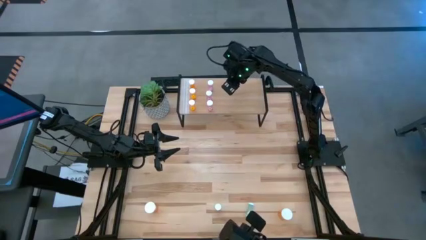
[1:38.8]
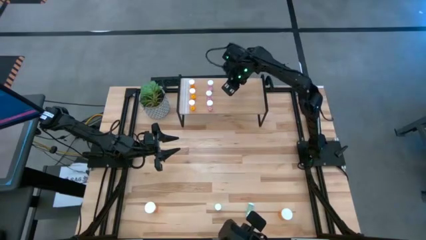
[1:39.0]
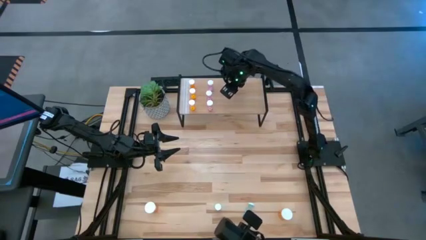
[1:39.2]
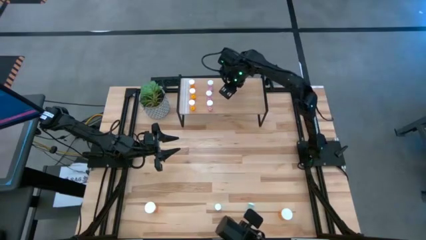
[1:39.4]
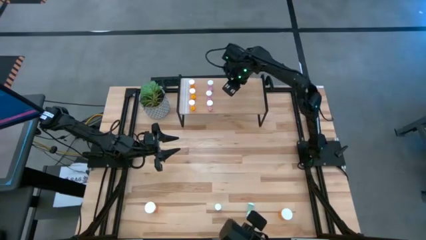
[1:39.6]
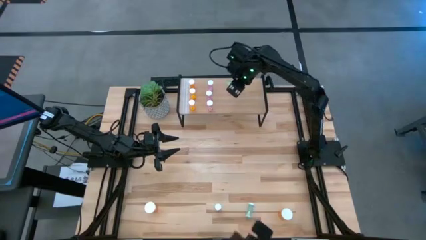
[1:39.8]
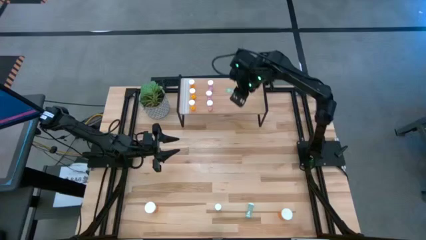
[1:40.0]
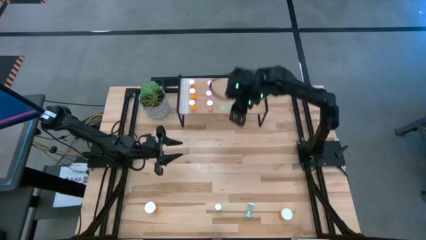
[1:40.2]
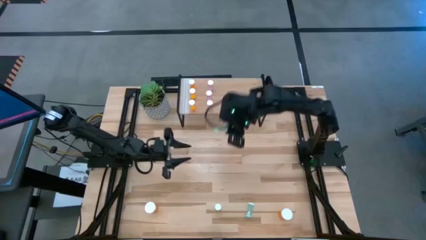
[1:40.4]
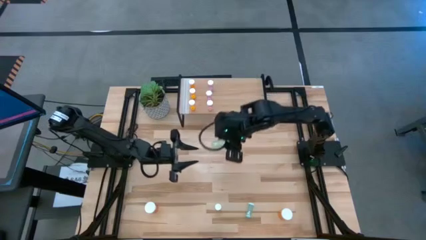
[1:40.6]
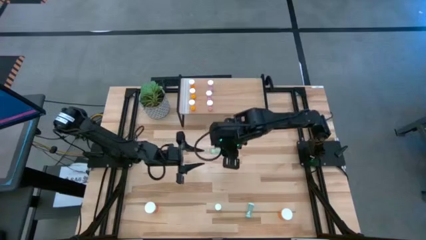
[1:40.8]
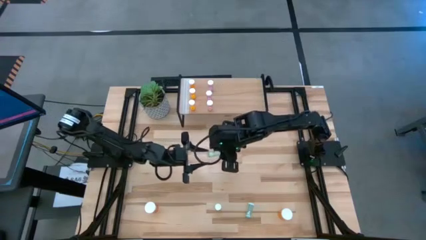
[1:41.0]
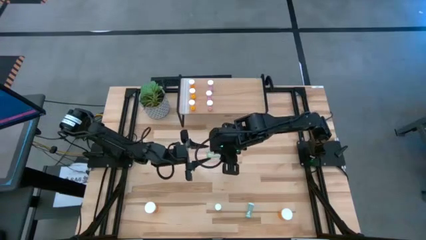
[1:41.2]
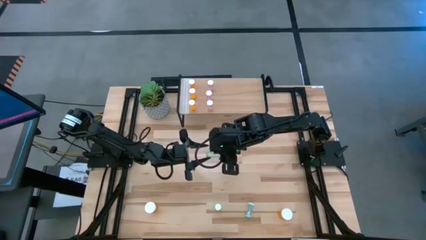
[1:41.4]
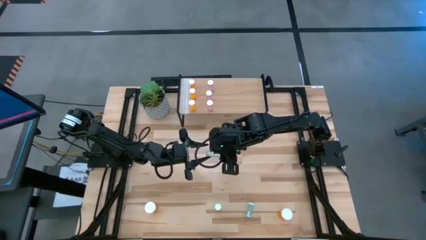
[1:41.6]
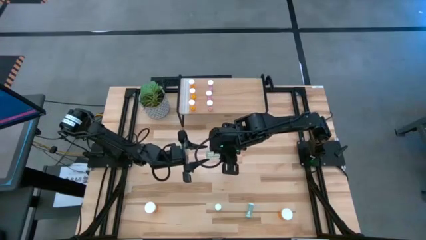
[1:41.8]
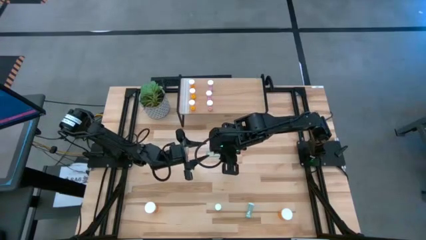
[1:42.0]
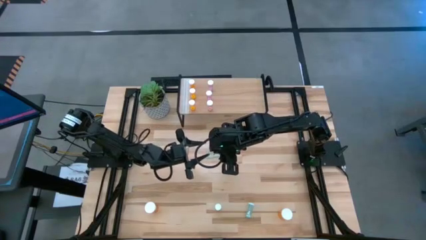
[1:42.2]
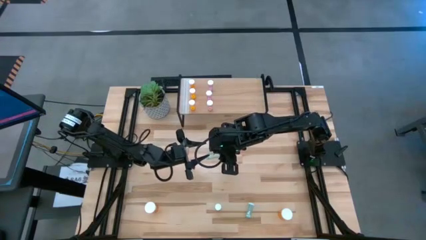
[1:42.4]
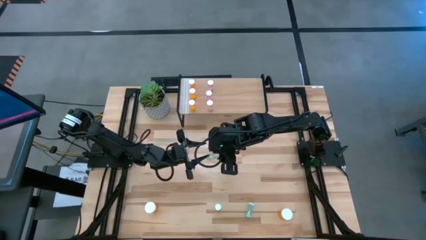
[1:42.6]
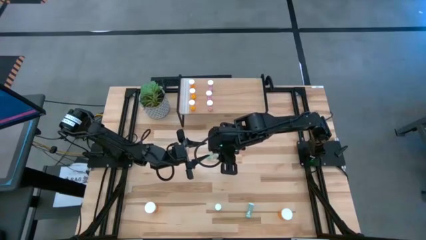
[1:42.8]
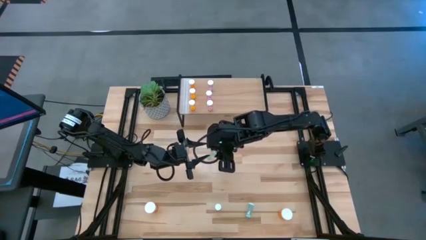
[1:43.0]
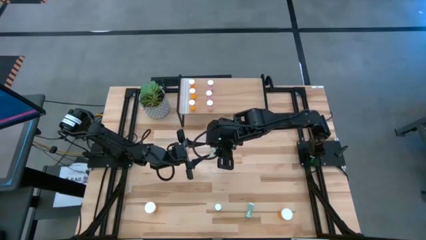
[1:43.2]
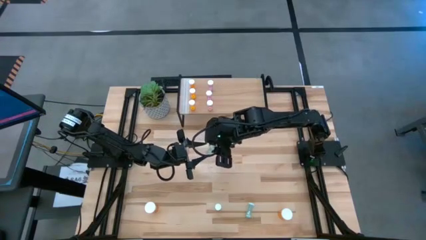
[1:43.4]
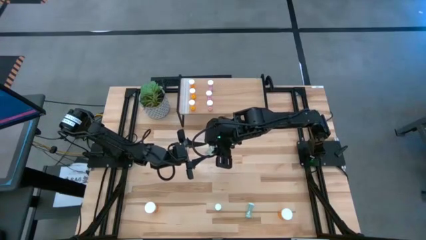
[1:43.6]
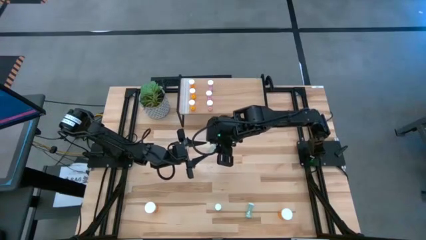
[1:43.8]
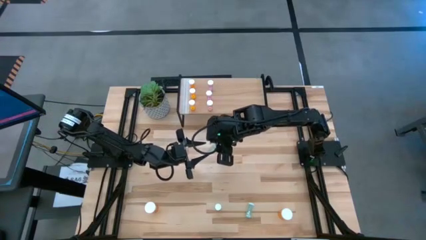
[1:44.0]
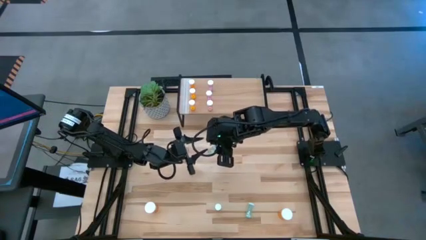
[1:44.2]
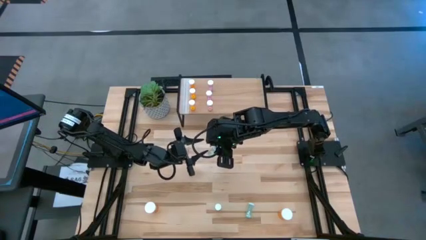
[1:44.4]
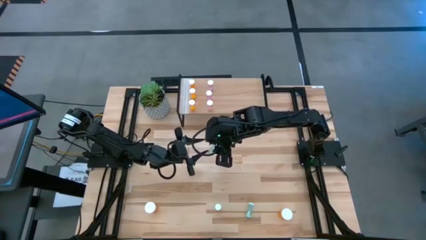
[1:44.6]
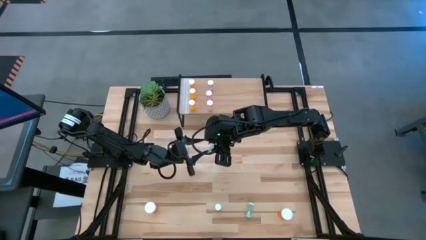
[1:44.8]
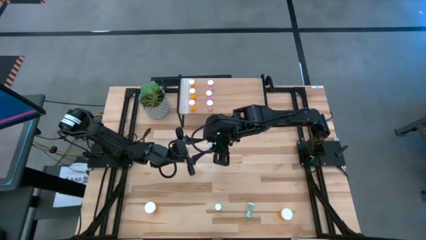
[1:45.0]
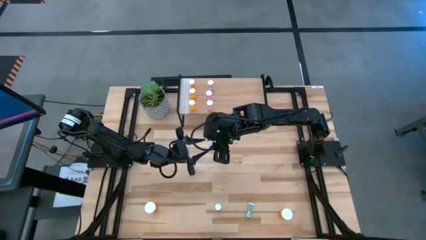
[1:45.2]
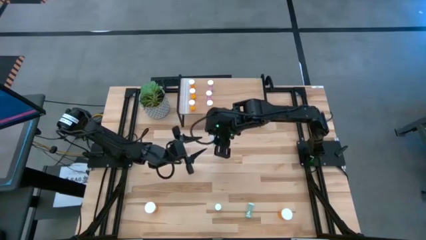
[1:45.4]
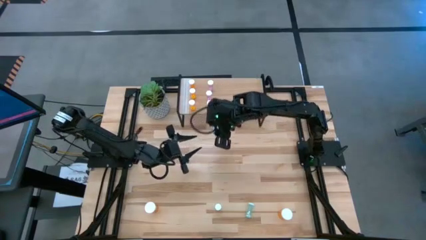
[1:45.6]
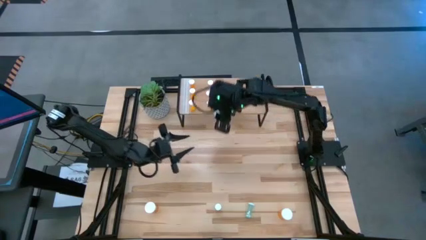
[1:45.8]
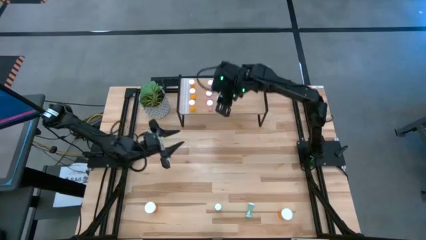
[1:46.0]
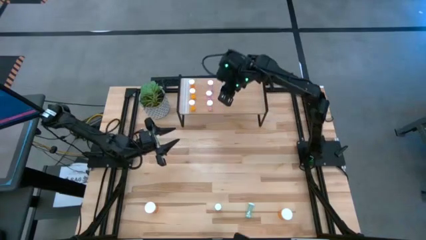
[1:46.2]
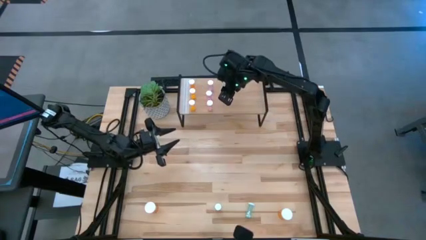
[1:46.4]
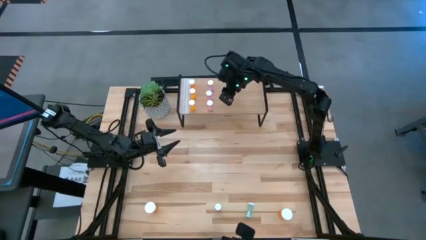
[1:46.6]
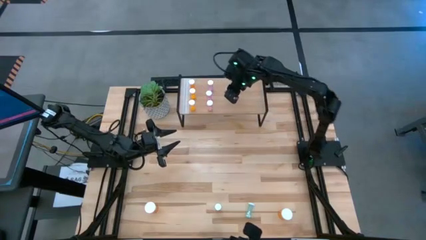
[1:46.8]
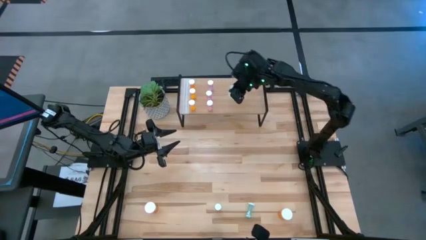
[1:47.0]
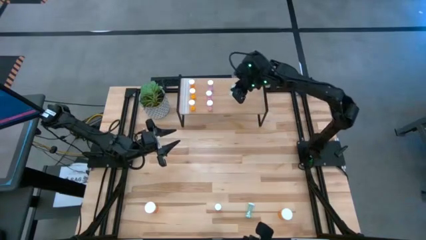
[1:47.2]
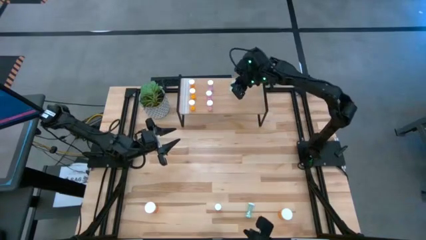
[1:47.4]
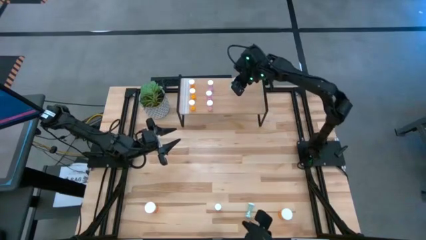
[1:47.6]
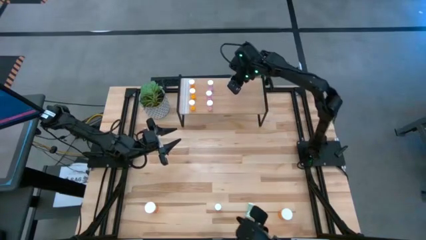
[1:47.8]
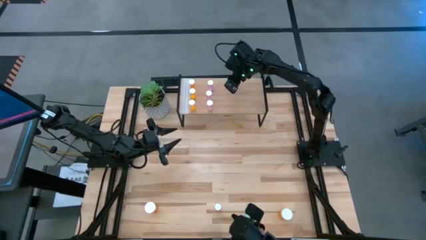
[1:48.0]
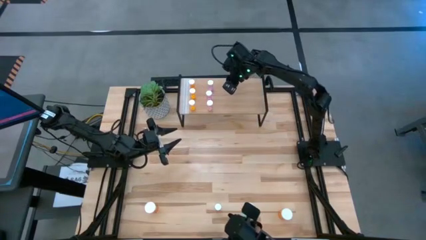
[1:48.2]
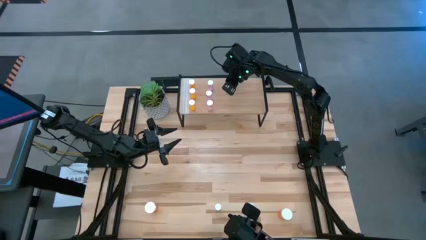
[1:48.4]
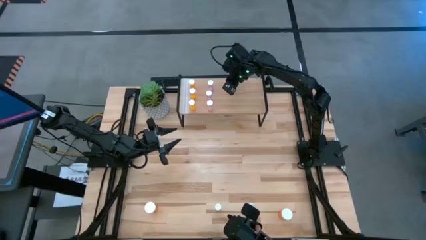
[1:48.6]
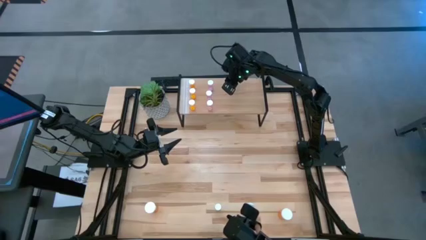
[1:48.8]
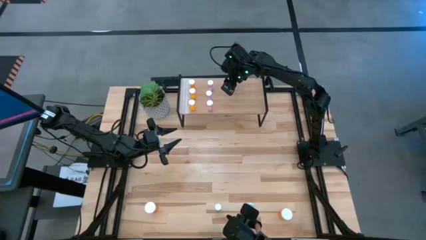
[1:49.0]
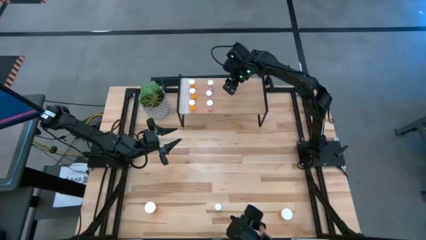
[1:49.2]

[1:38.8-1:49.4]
Task: Pick and place medicine bottles onto shelf by color
Put the top green pill bottle on the shelf
